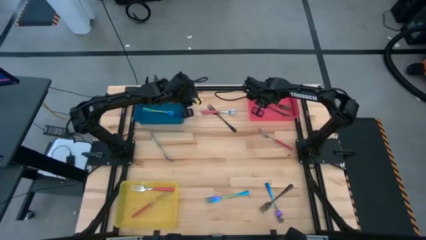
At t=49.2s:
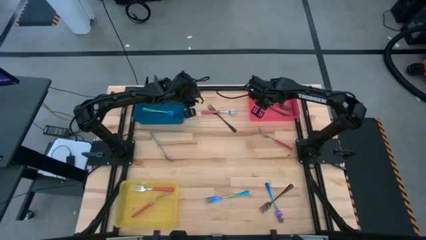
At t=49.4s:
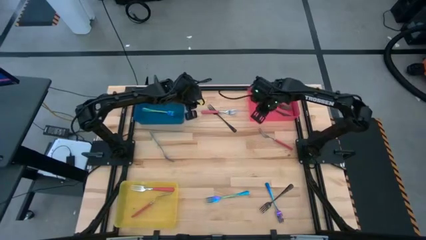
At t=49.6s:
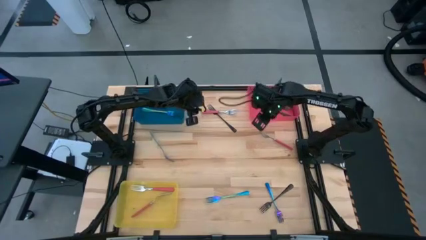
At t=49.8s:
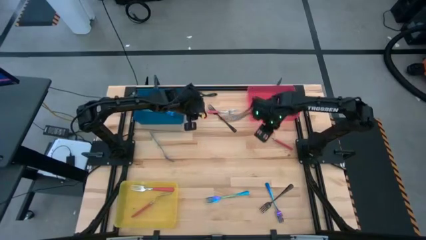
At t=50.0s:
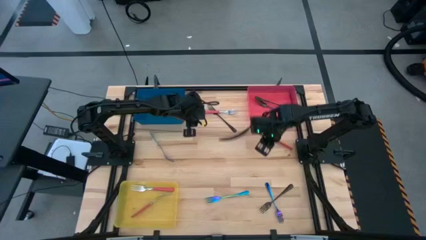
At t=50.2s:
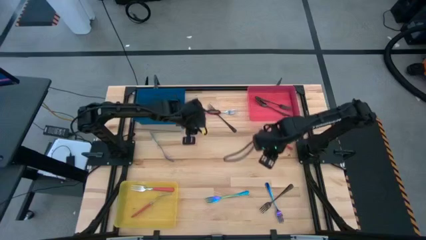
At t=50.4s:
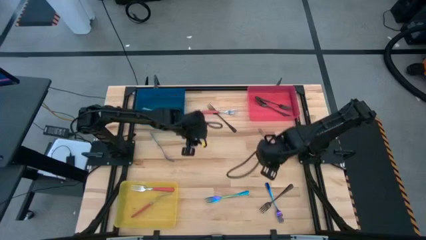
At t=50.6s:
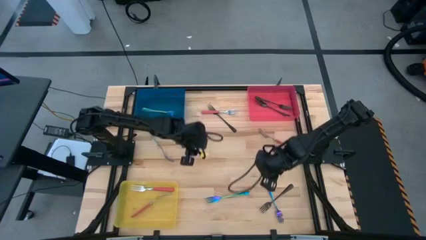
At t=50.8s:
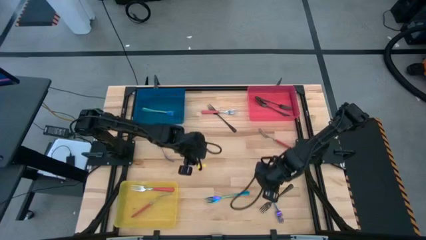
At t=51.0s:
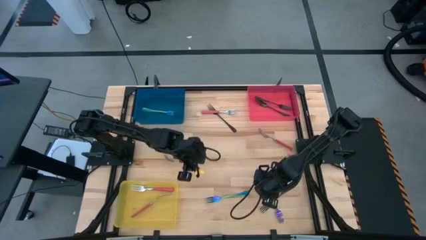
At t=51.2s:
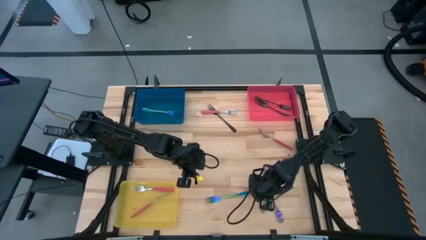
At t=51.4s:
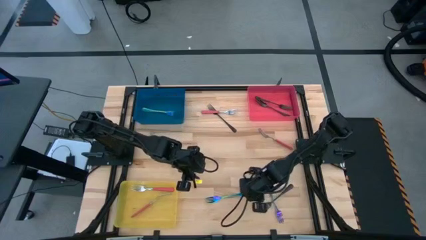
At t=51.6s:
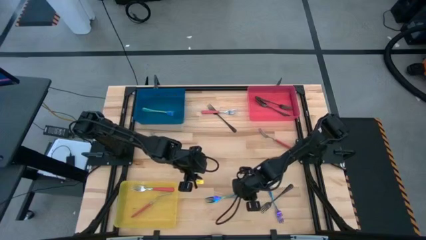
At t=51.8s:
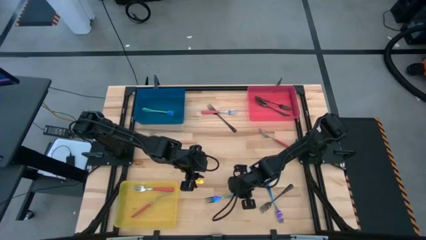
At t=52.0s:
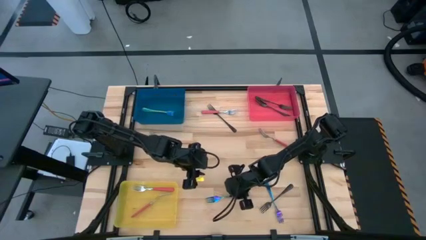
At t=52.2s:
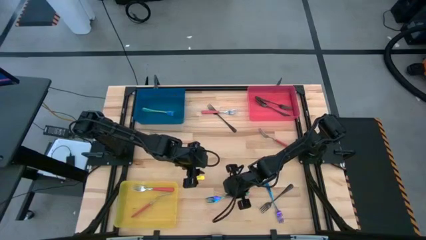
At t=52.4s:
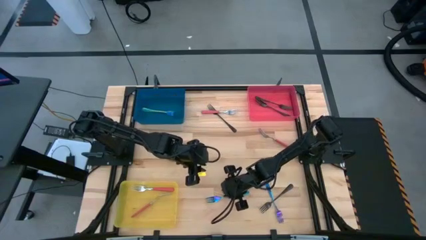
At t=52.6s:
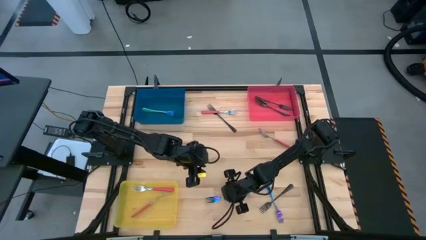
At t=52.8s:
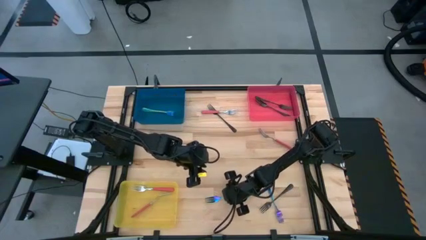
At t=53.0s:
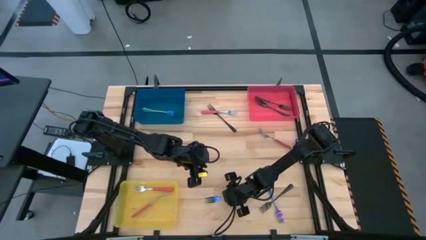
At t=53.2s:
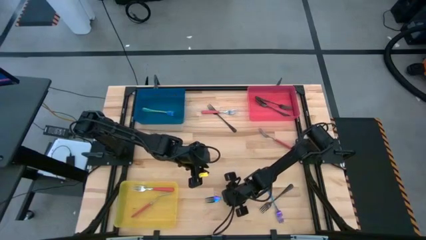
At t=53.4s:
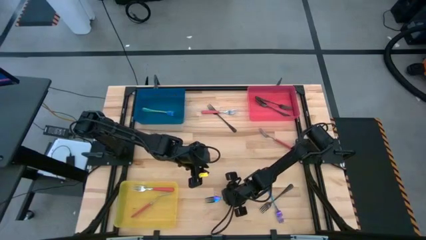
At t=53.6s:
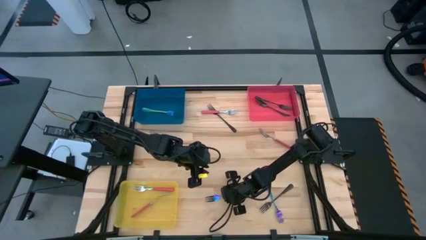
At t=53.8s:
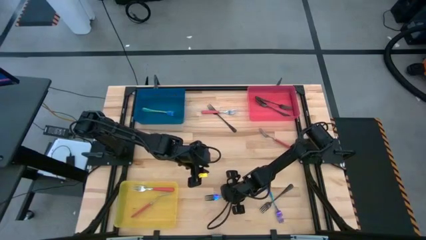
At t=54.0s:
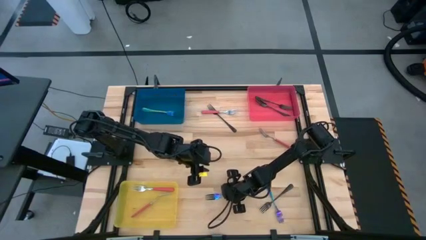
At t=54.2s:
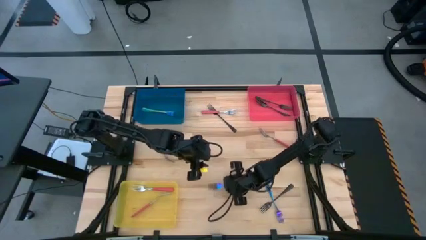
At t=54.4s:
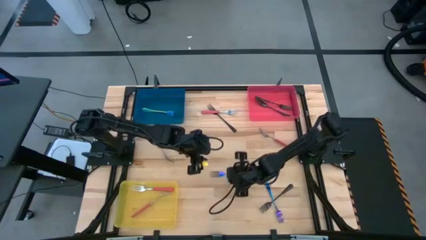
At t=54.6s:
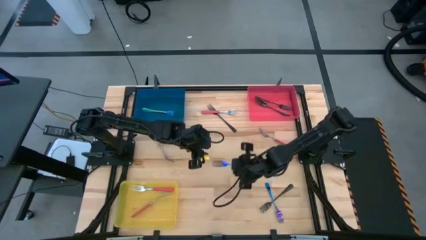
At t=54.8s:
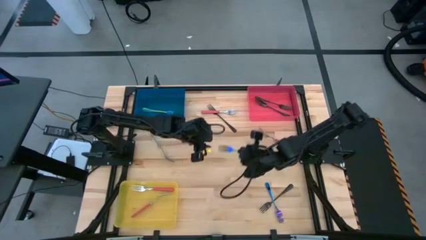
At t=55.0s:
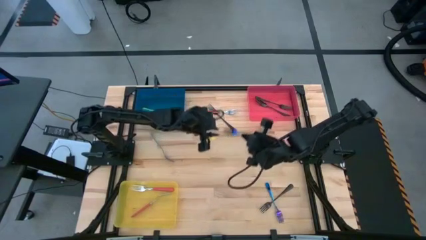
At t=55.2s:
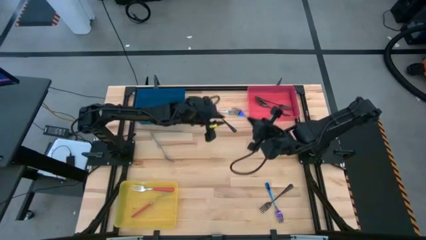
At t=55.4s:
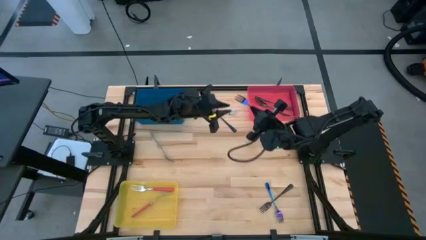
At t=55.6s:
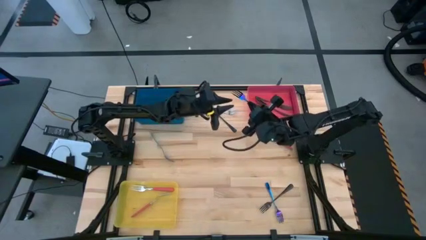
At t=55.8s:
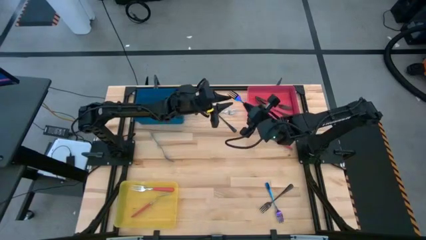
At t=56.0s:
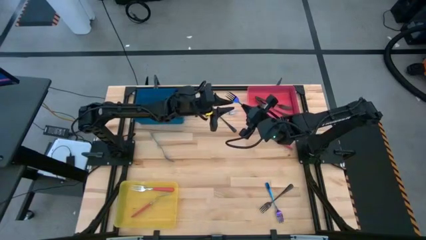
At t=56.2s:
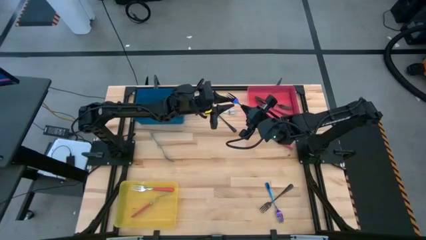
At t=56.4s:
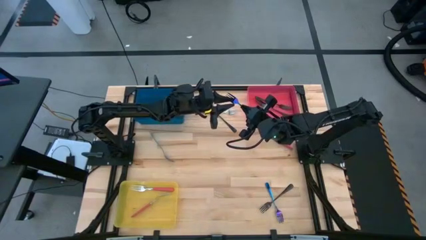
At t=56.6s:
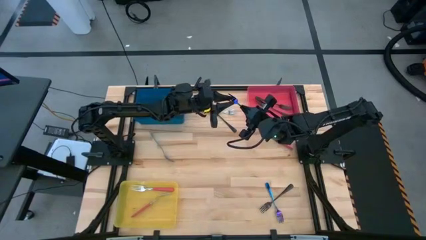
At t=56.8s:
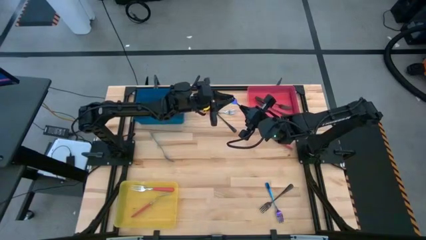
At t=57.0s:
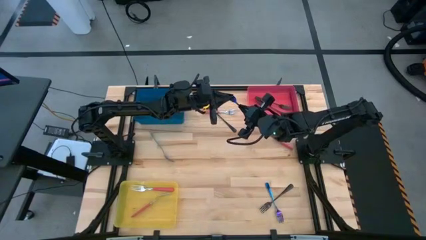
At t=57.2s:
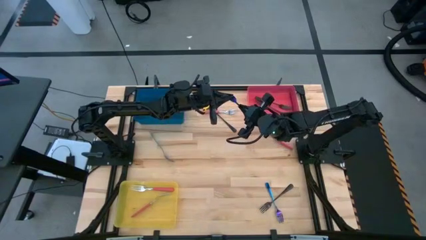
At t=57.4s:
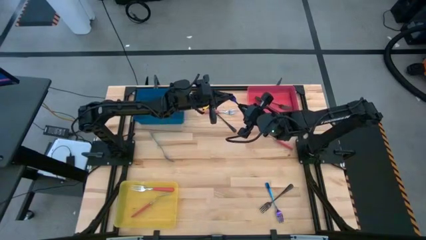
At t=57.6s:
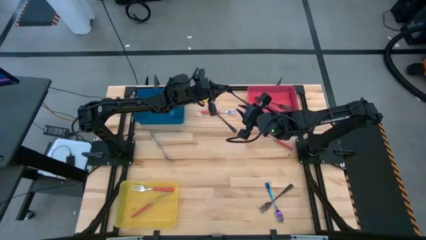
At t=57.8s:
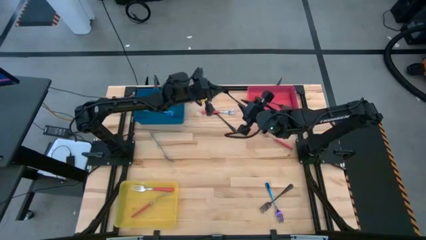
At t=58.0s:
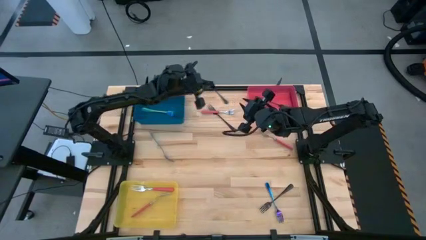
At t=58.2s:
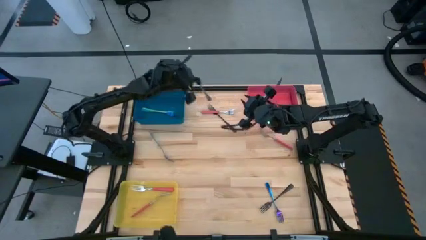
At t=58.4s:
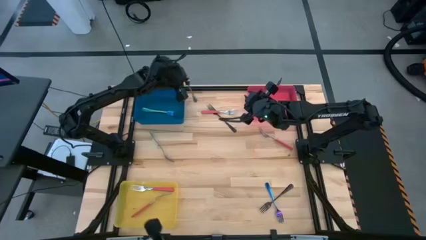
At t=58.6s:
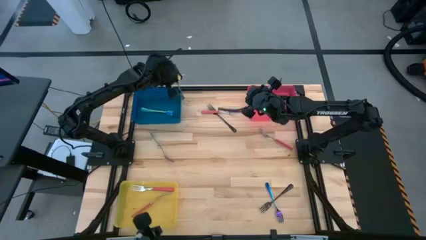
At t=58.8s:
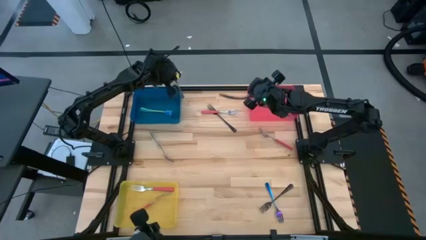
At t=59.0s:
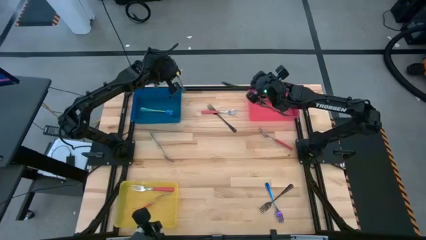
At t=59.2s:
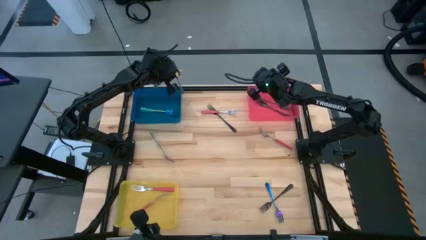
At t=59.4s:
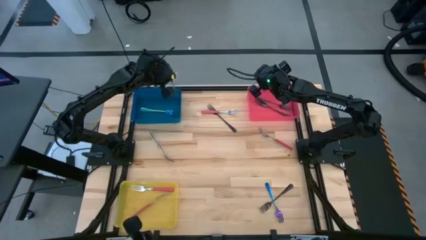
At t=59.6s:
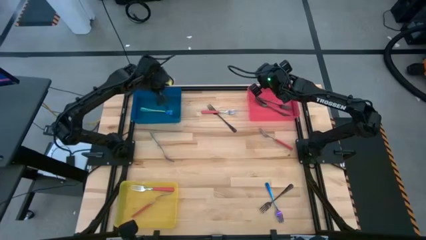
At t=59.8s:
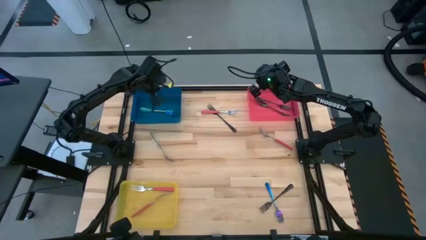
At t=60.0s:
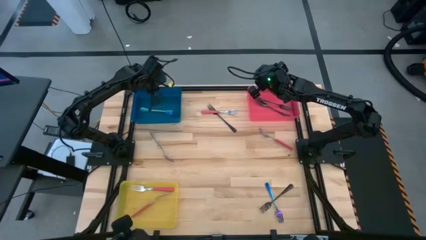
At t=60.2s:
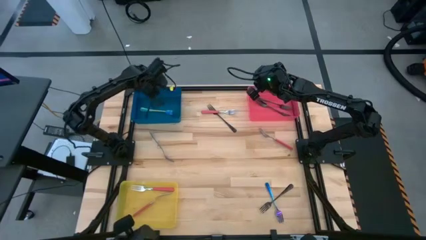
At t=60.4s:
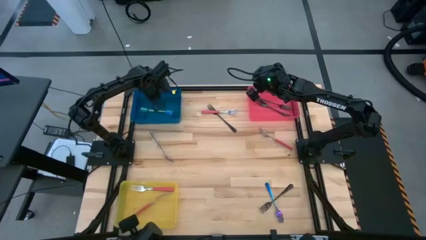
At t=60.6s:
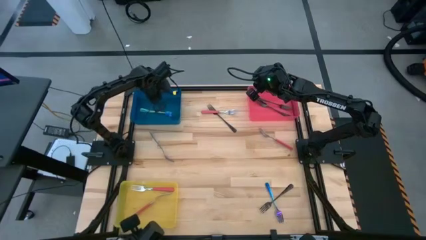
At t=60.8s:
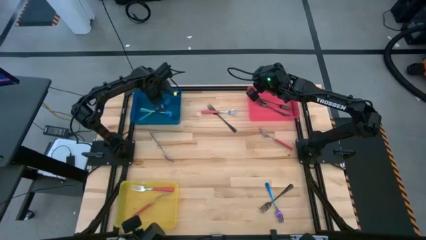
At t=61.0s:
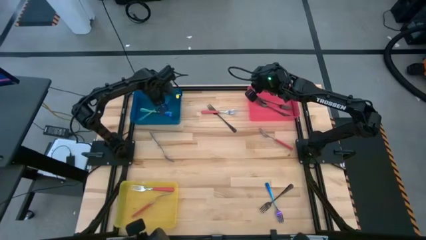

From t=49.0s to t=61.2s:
Task: Sort silverware by color (type)
Put the bottom middle iridescent fork into the blue bin

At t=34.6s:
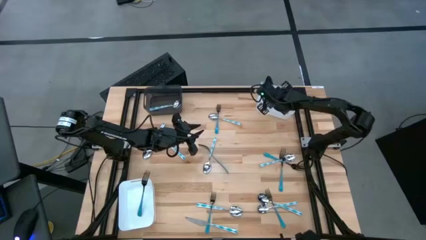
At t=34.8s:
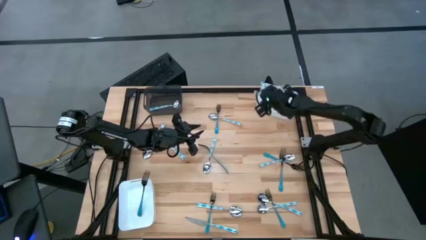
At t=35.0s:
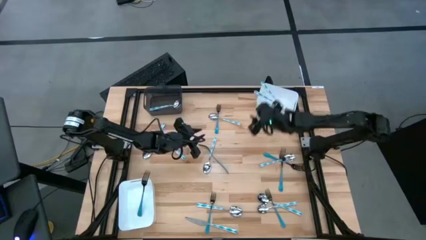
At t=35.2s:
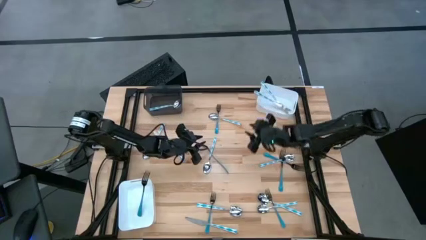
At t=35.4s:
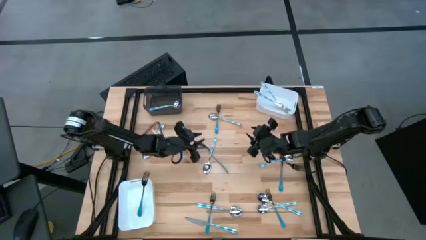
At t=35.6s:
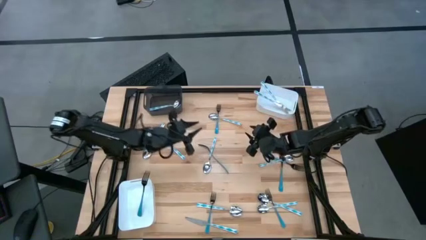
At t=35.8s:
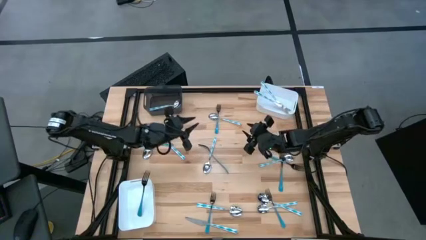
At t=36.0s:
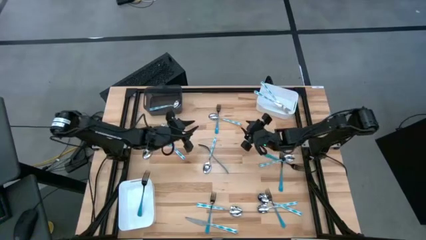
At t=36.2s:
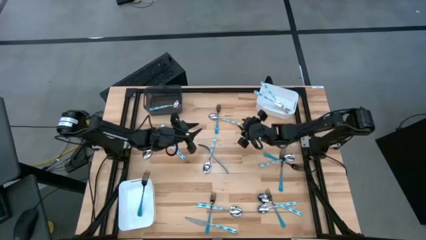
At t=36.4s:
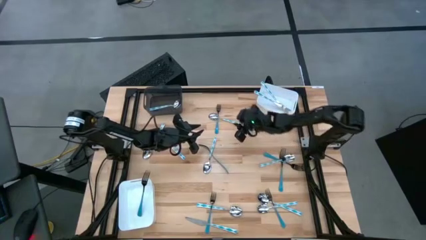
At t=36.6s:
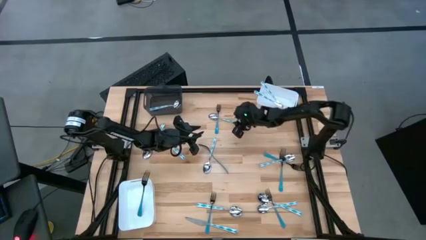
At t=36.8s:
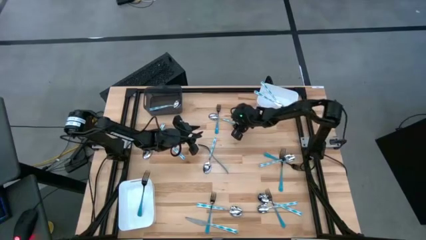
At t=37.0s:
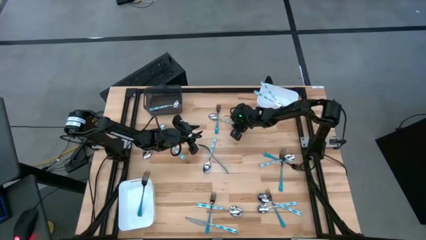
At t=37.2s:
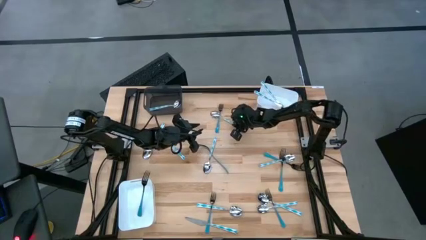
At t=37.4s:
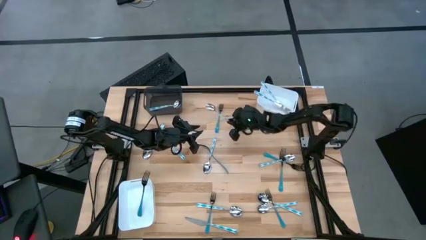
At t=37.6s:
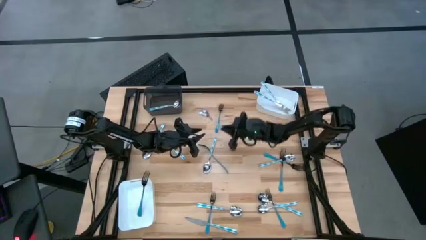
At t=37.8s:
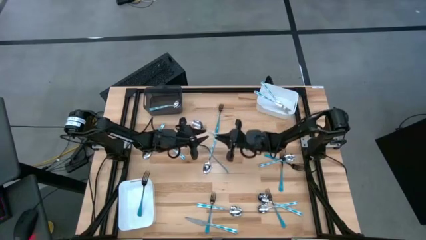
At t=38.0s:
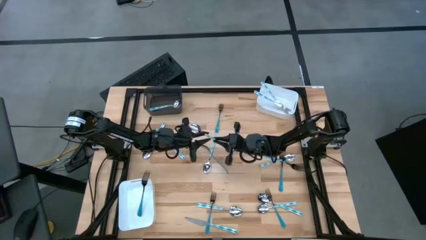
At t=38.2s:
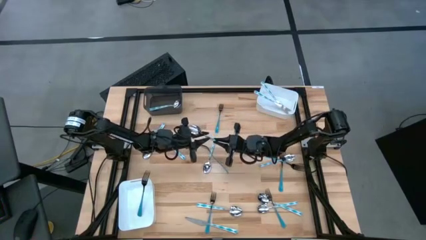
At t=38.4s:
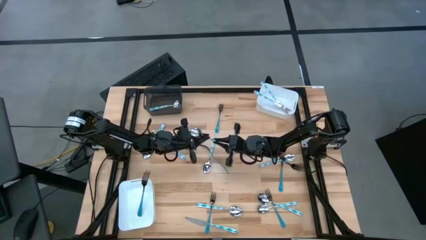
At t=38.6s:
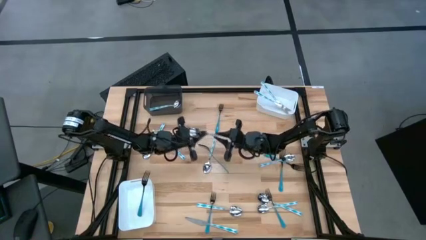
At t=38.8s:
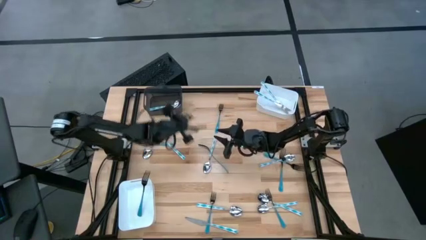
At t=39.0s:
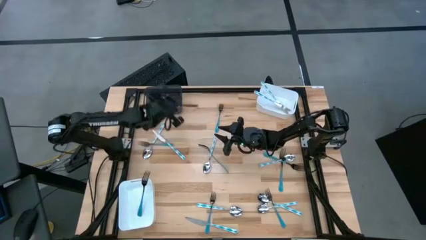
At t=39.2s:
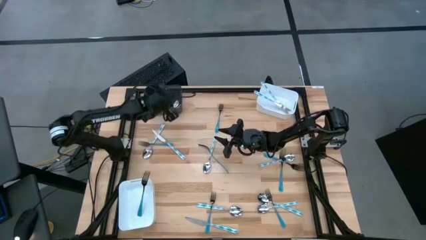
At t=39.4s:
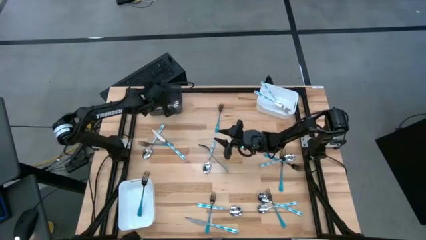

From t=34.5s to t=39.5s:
Task: Sort silverware by color (type)
Put the blue patterned spoon into the black bin
